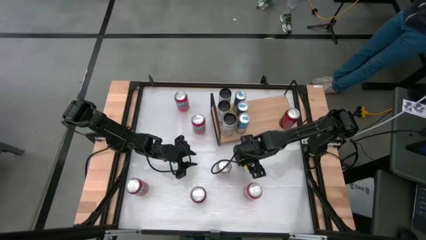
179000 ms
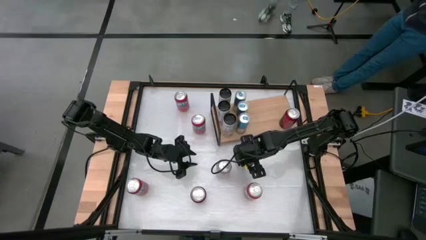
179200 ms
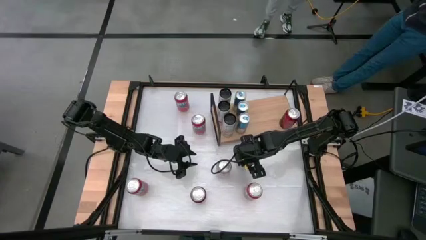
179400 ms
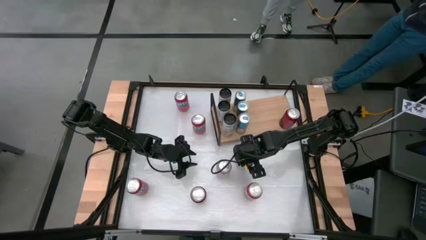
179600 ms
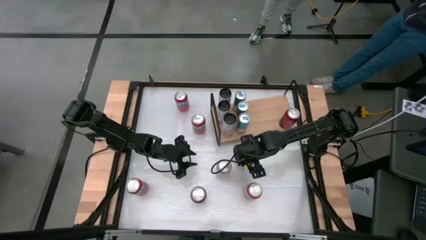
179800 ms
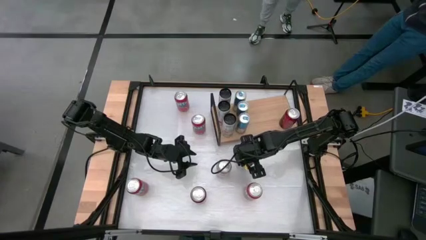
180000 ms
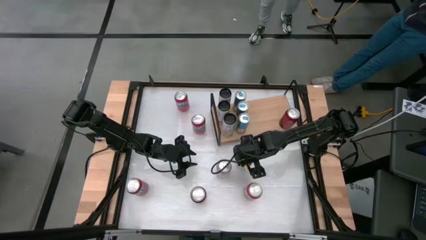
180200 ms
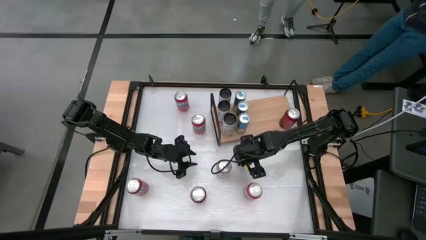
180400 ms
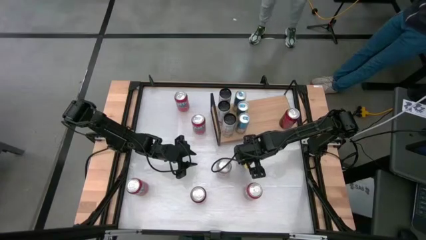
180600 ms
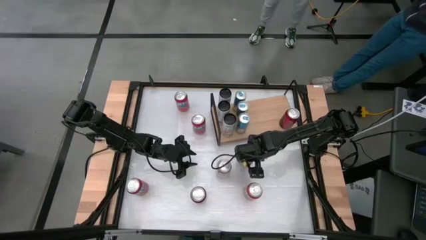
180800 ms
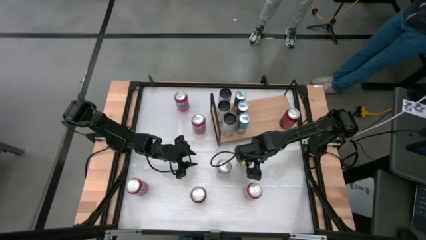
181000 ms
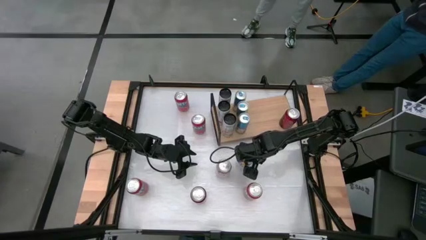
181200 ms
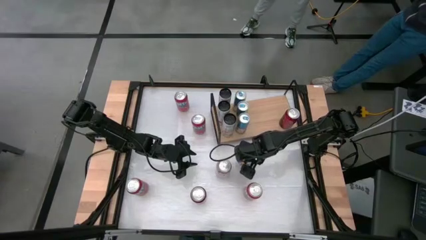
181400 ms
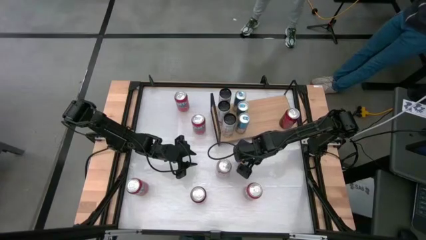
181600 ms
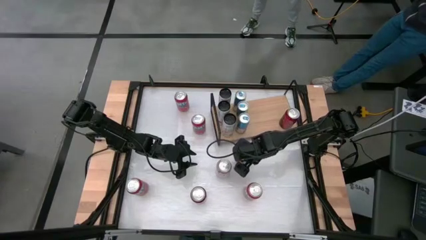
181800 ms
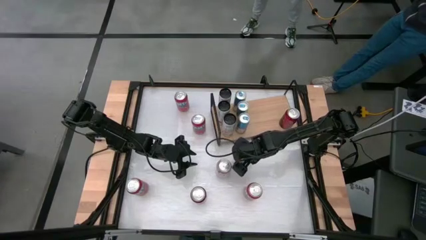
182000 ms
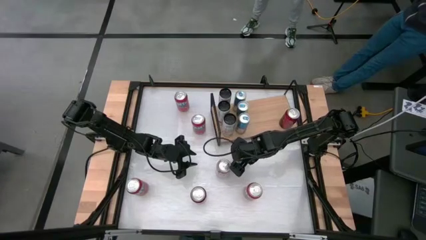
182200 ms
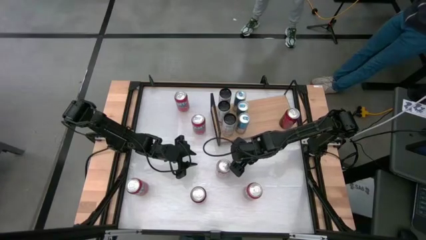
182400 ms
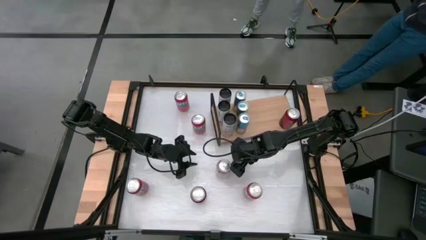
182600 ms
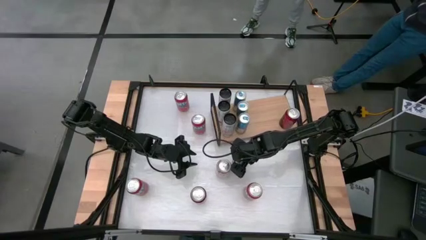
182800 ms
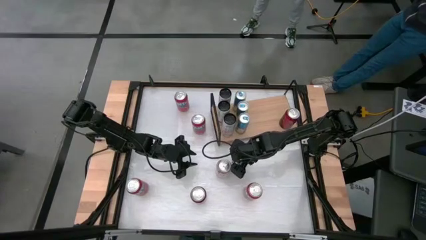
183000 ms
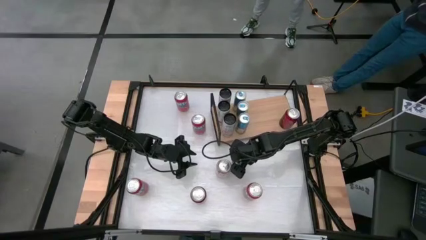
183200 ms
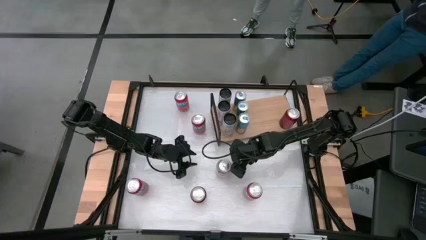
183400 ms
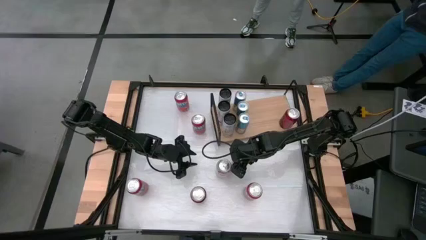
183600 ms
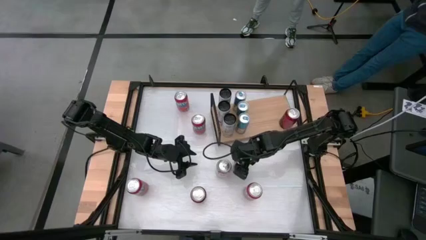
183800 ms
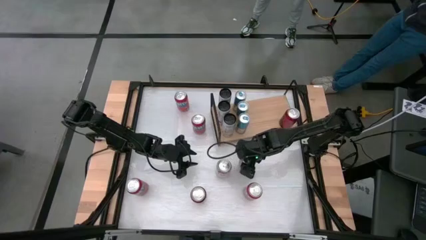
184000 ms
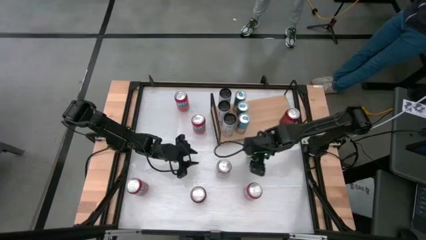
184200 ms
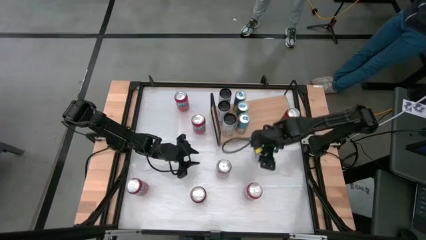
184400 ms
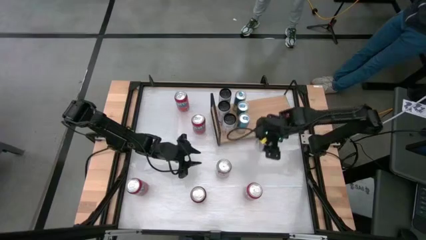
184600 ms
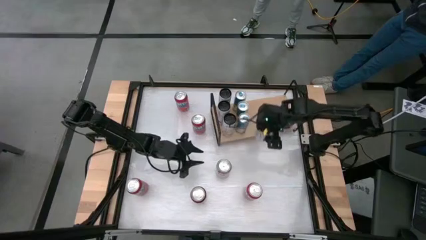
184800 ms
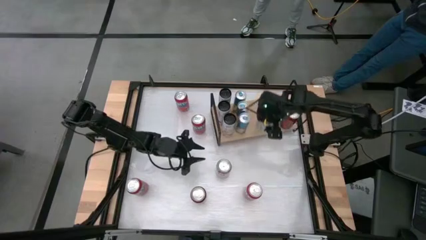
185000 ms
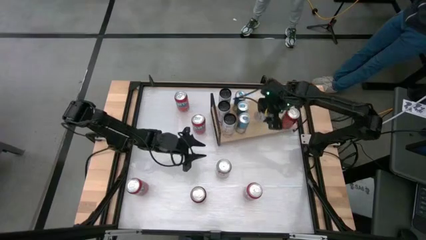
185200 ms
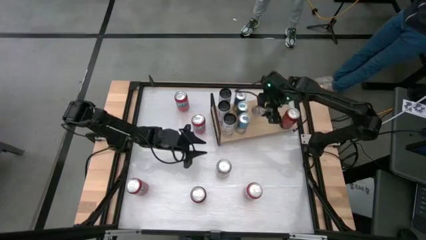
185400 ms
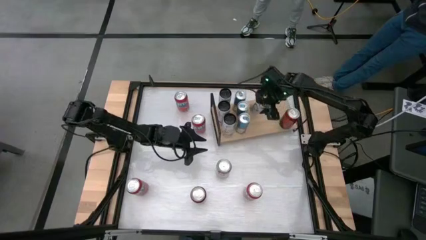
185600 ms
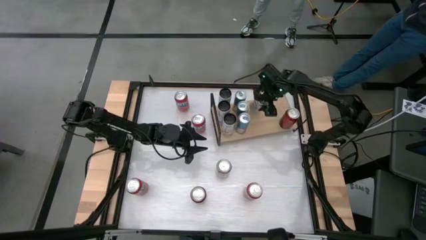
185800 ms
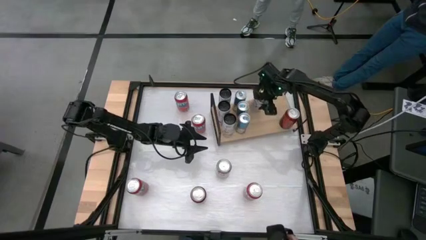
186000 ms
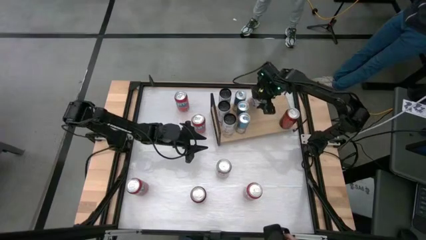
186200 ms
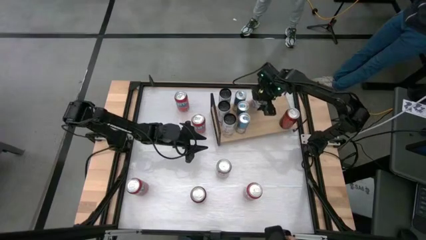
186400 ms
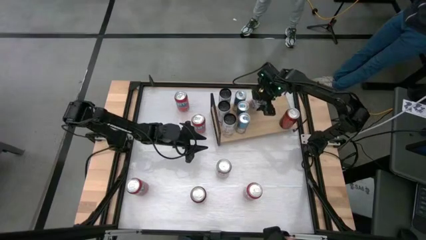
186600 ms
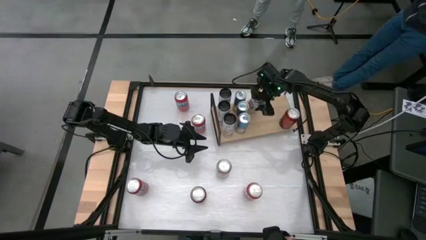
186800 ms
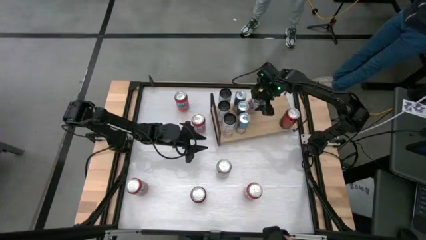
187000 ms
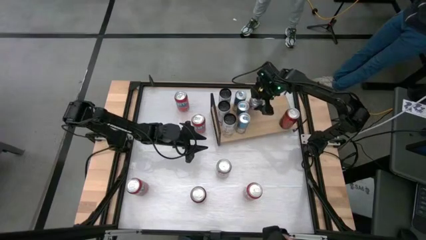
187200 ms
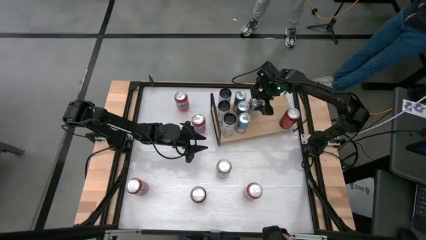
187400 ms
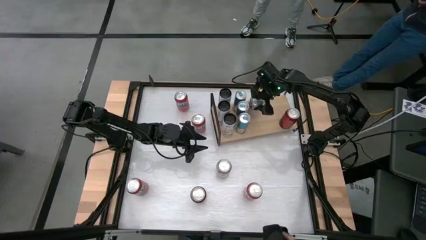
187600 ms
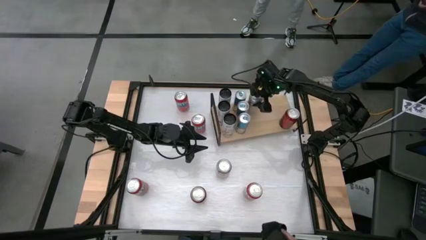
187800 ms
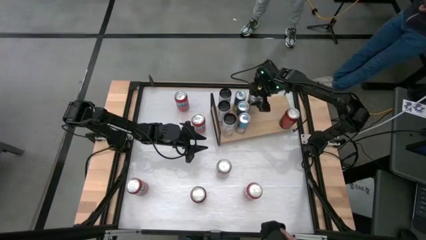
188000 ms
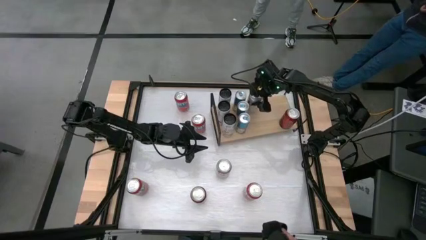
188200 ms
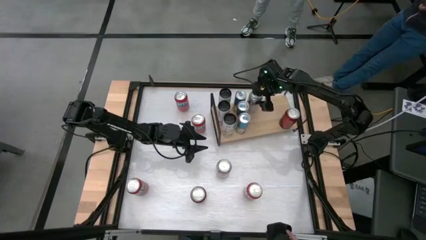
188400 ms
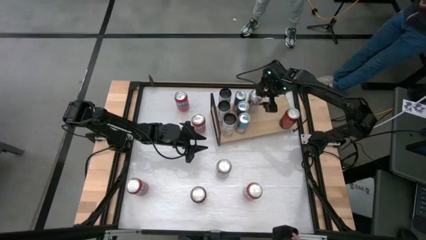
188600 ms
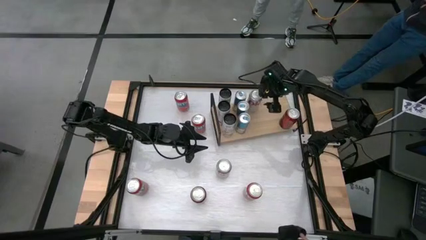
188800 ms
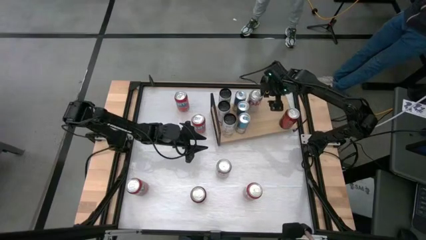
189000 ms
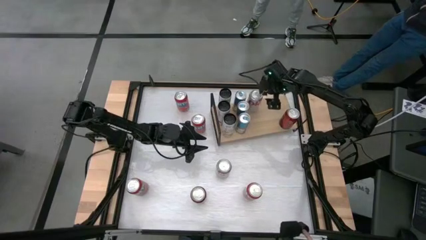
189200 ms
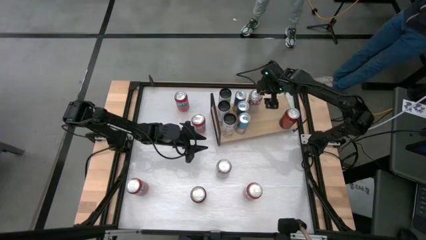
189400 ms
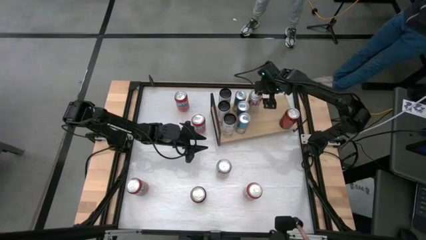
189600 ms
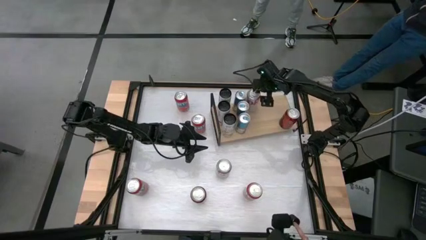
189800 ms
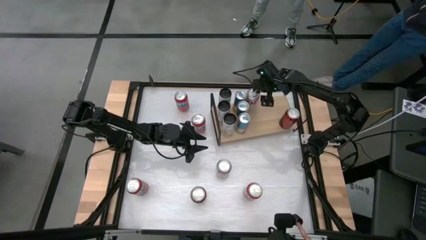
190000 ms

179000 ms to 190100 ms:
Task: Place canned beverage on shelf
Put the right silver soda can on the shelf

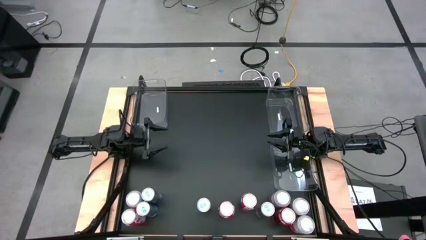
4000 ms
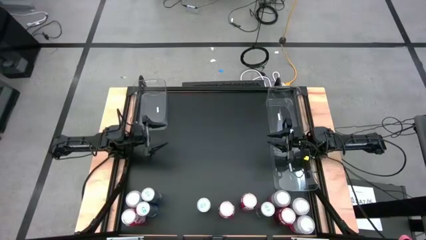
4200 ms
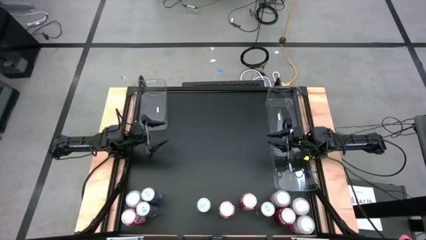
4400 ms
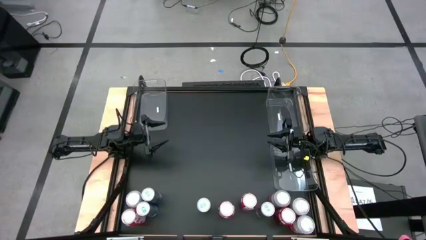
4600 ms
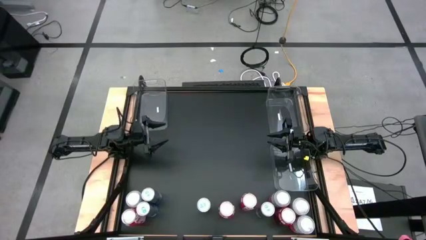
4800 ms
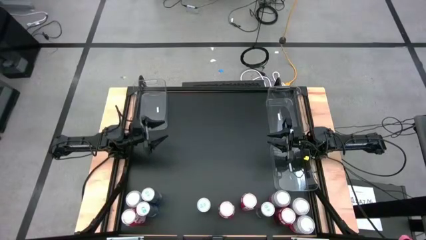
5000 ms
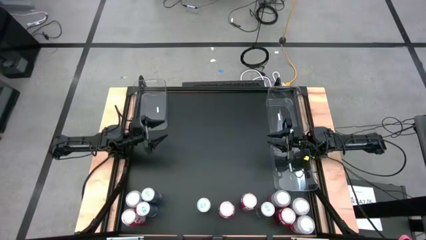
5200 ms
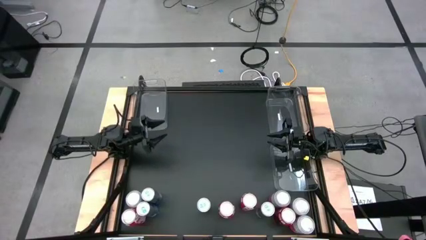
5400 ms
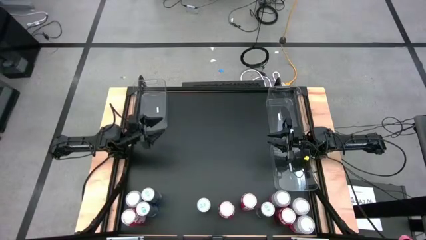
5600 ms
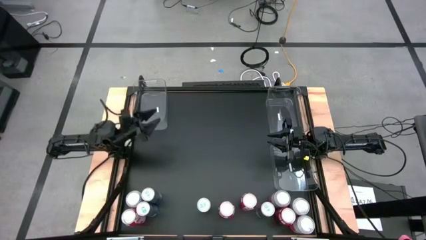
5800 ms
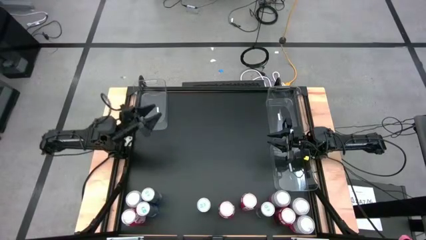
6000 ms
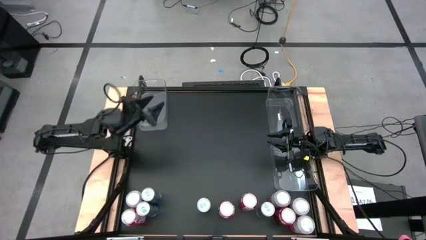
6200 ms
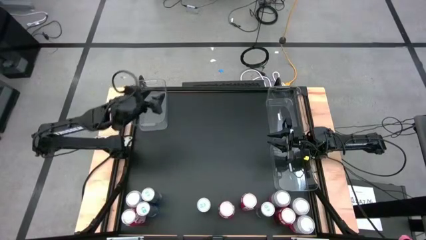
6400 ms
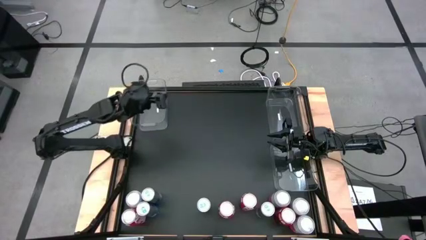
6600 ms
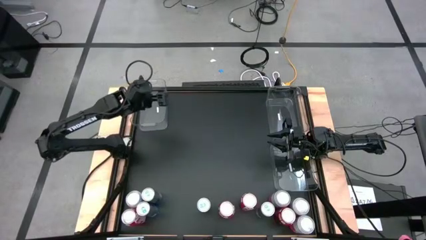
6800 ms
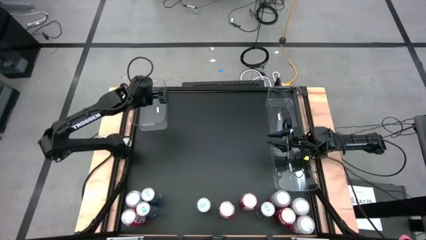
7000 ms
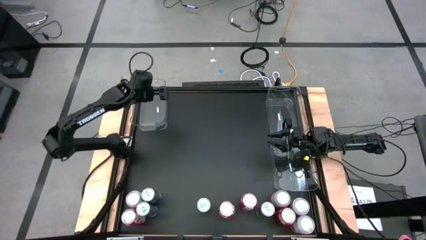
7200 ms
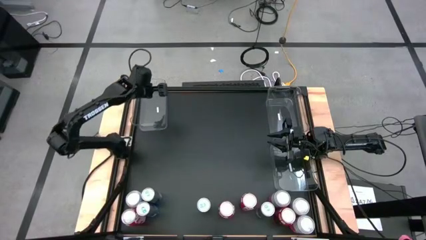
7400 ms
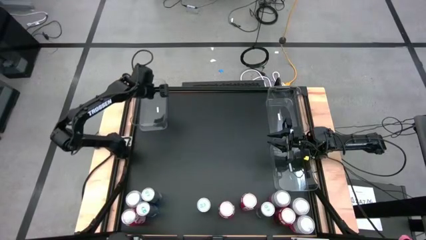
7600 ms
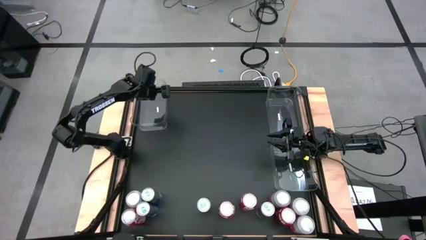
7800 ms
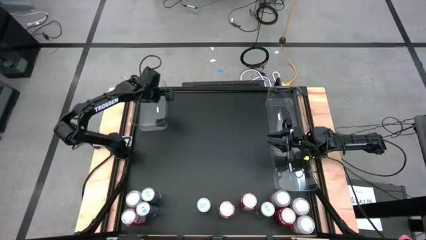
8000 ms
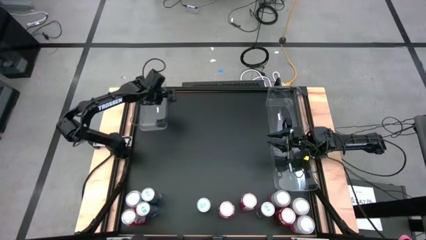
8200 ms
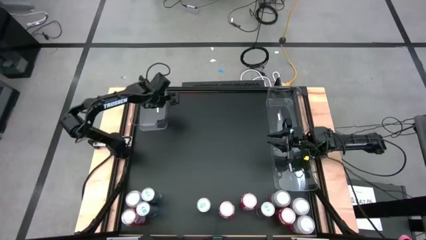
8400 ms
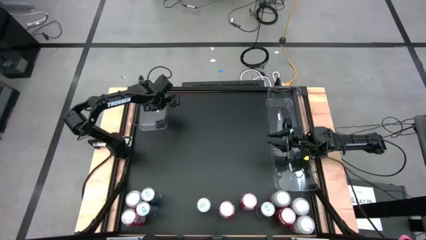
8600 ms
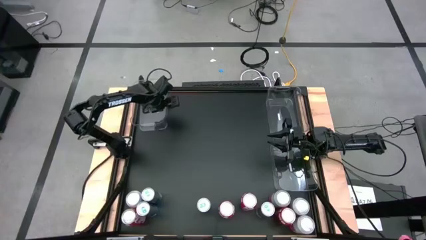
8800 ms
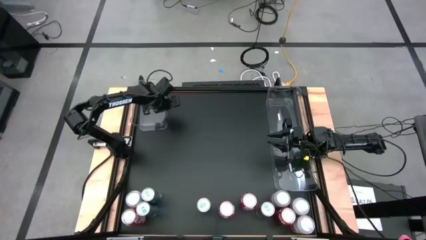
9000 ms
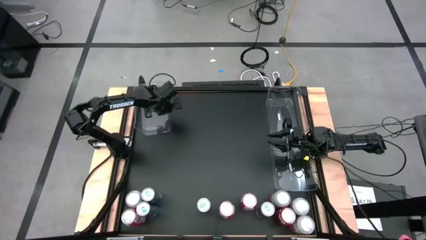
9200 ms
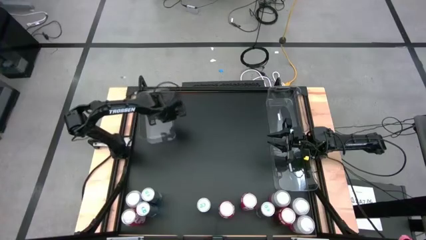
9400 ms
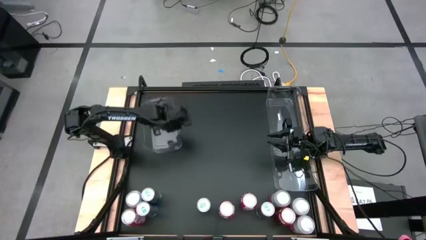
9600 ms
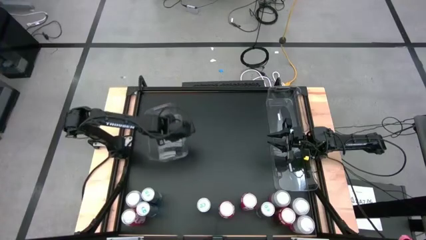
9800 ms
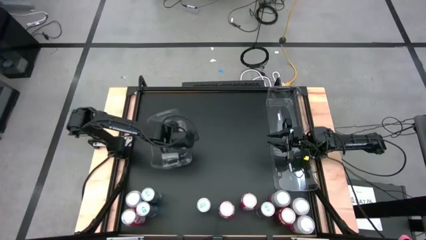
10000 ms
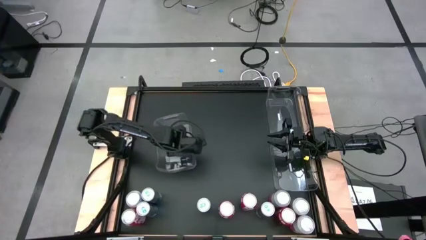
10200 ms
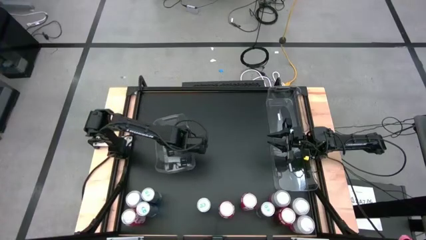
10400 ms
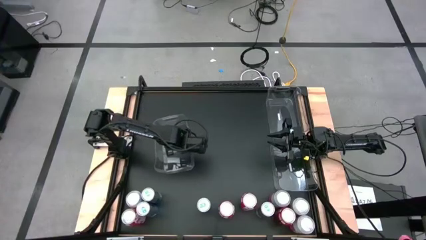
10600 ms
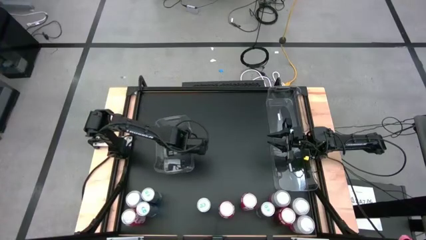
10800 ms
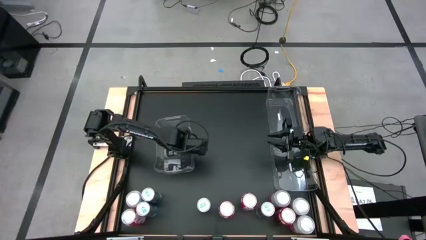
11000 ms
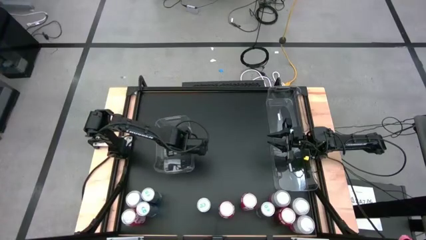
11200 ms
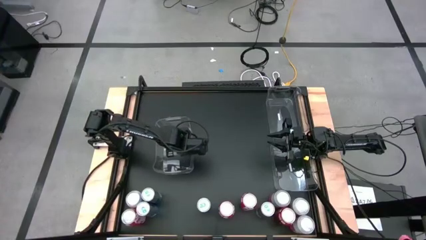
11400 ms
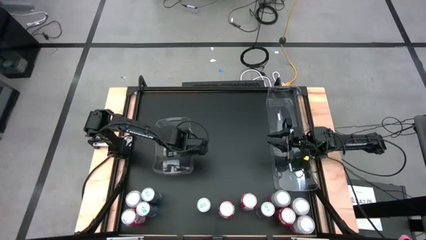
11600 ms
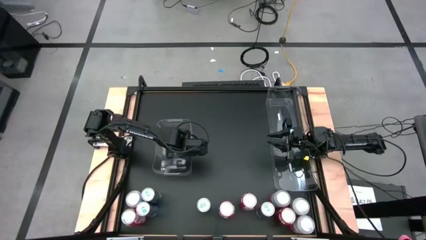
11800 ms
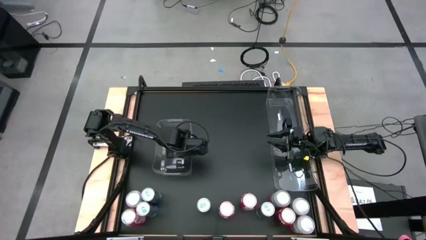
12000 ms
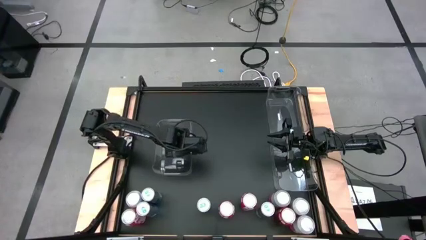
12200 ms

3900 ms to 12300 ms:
Task: Sort soda cans
Move the top left transparent bin to the middle left of the table
